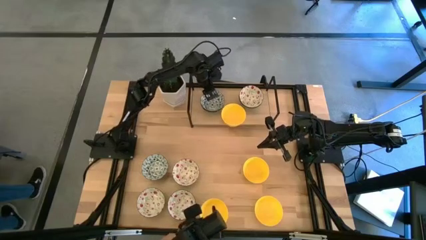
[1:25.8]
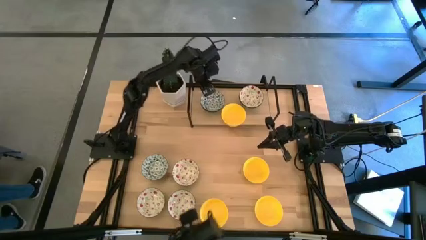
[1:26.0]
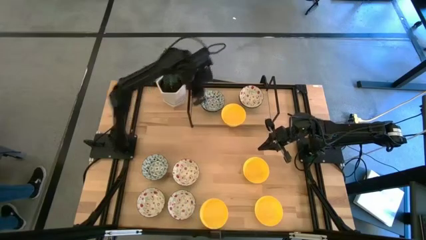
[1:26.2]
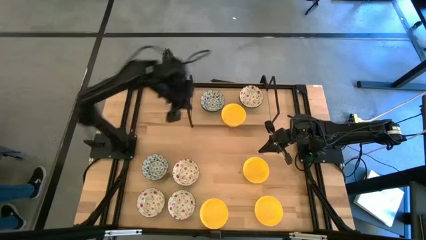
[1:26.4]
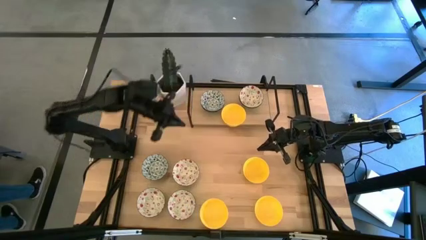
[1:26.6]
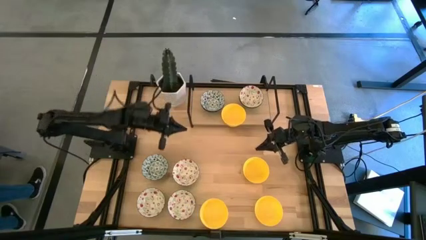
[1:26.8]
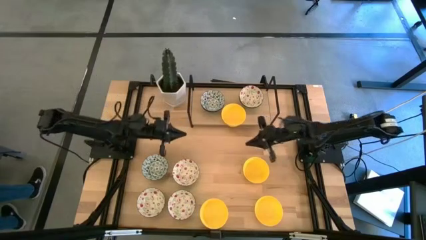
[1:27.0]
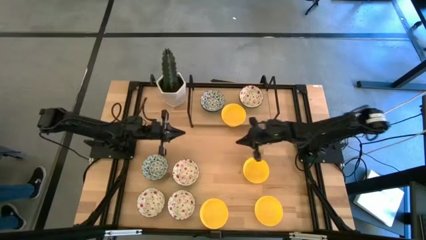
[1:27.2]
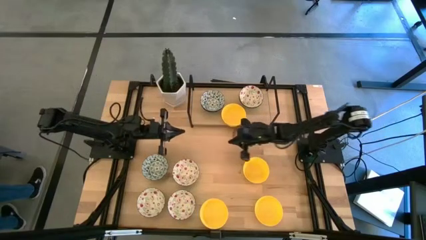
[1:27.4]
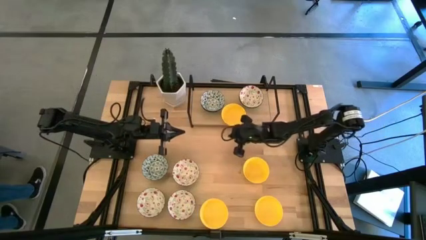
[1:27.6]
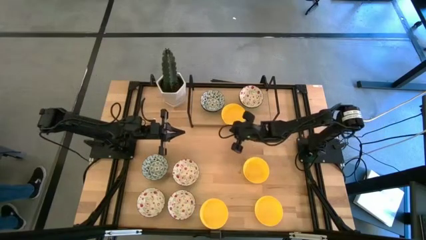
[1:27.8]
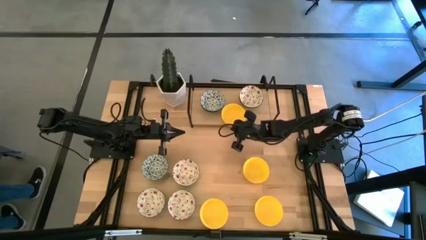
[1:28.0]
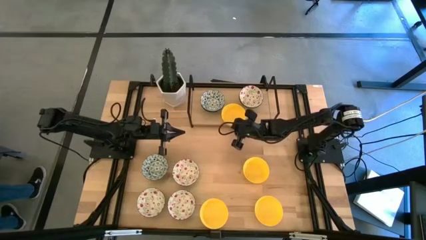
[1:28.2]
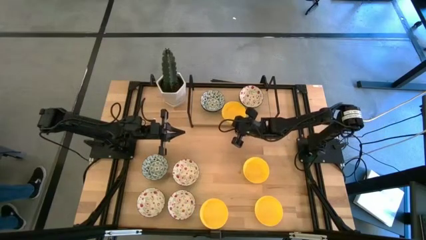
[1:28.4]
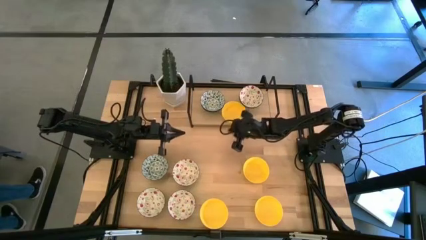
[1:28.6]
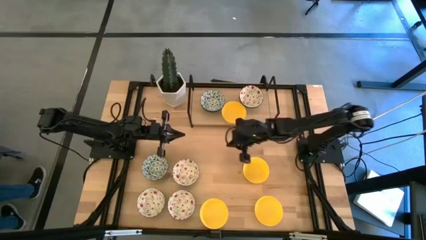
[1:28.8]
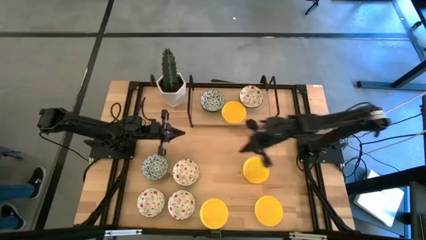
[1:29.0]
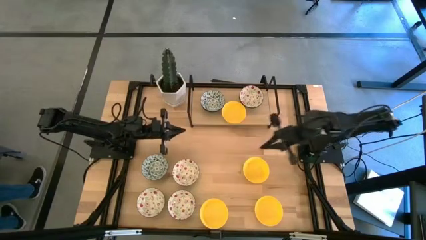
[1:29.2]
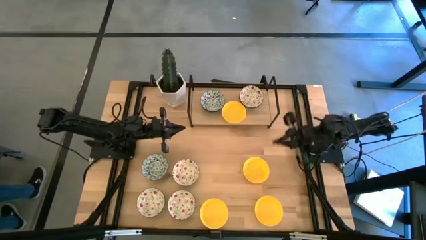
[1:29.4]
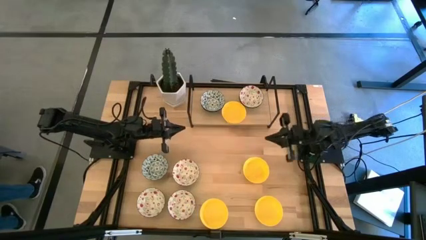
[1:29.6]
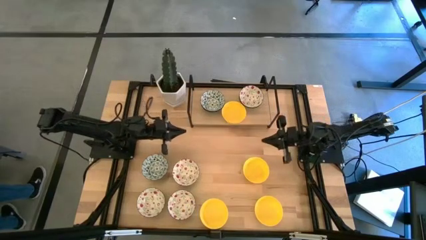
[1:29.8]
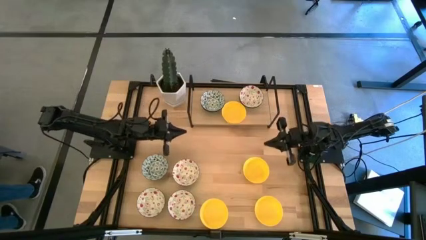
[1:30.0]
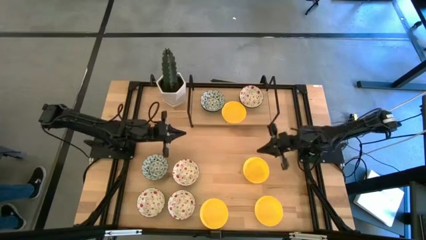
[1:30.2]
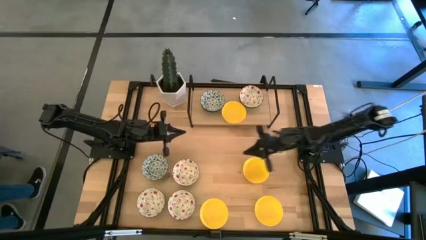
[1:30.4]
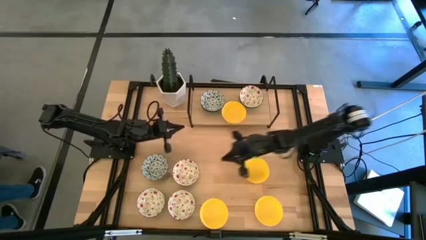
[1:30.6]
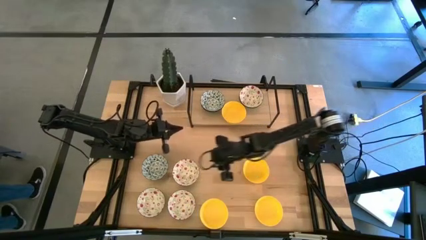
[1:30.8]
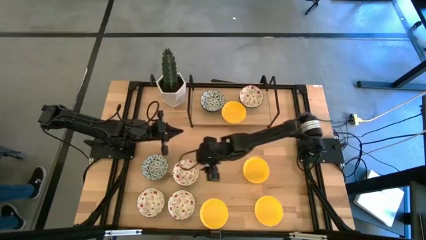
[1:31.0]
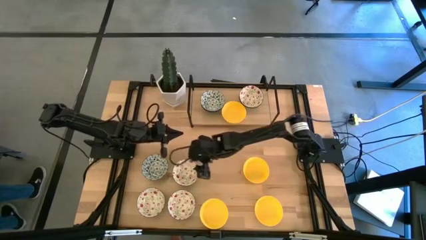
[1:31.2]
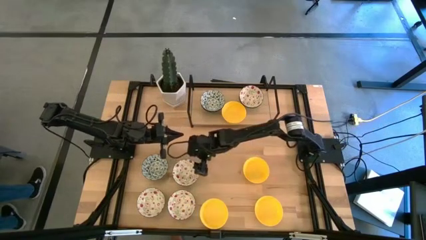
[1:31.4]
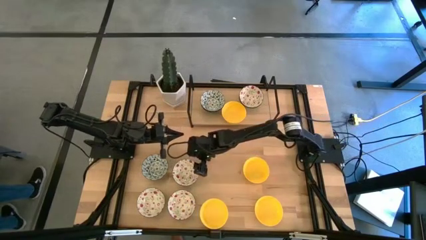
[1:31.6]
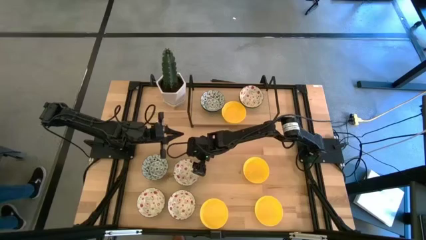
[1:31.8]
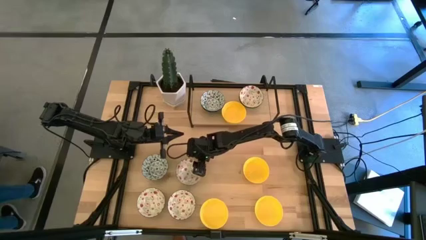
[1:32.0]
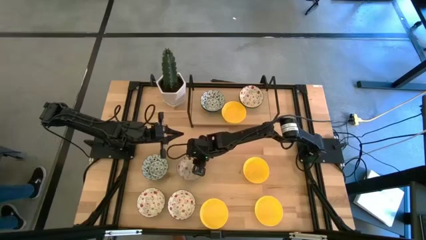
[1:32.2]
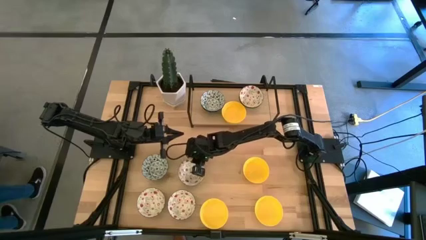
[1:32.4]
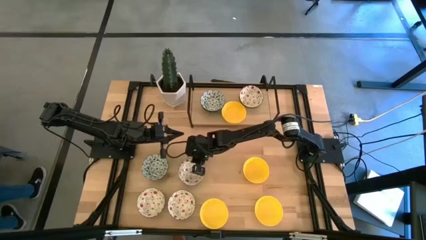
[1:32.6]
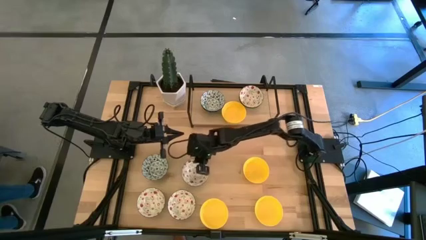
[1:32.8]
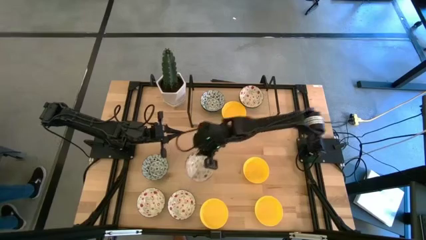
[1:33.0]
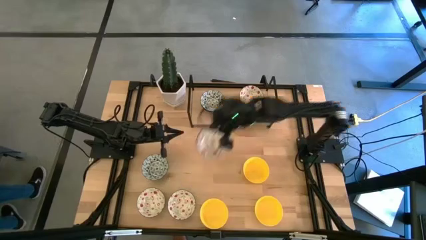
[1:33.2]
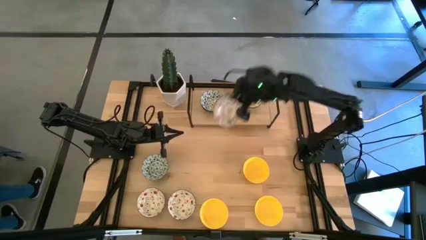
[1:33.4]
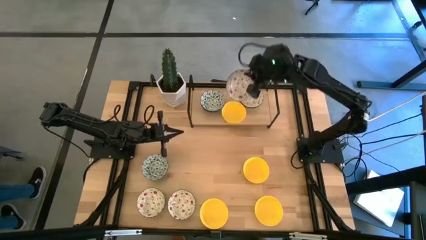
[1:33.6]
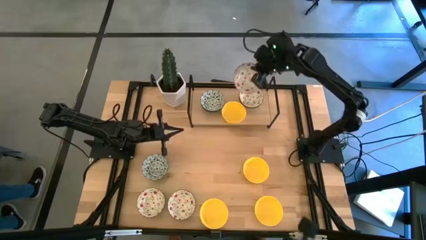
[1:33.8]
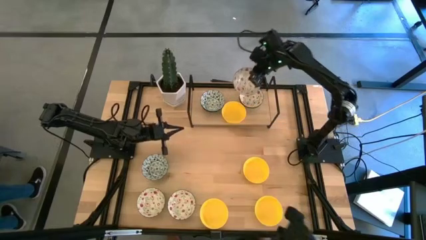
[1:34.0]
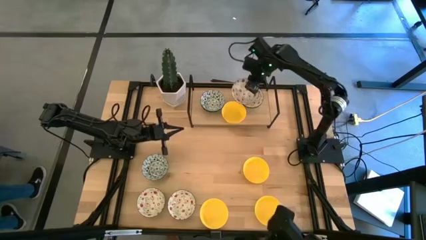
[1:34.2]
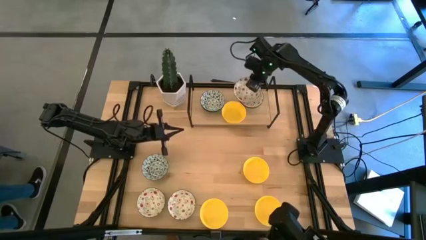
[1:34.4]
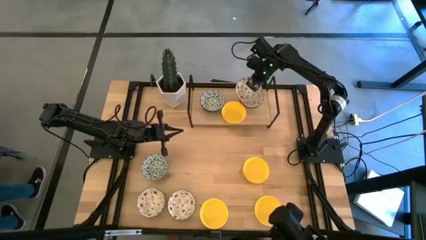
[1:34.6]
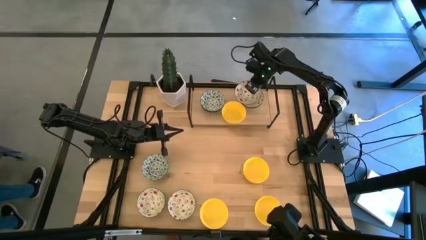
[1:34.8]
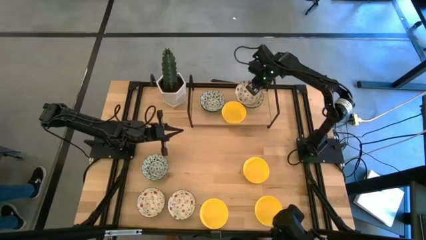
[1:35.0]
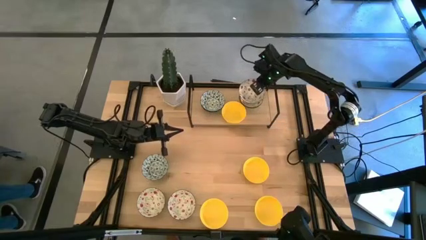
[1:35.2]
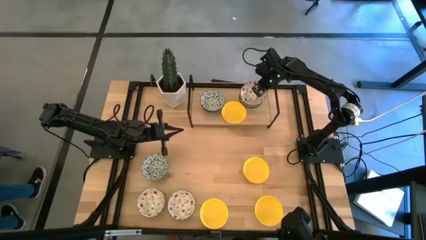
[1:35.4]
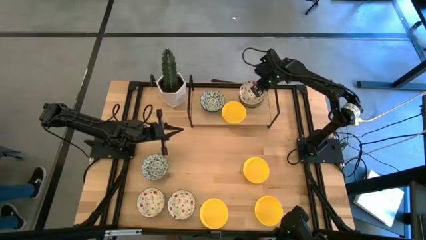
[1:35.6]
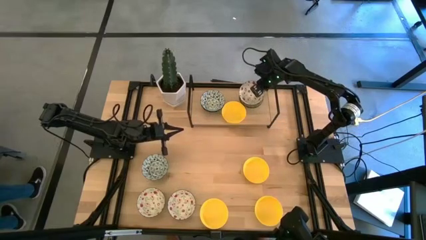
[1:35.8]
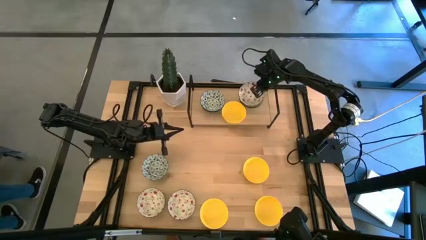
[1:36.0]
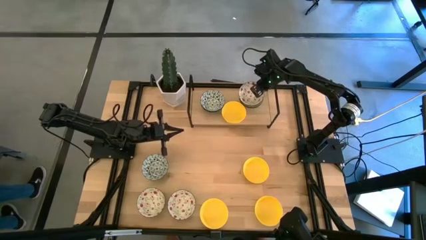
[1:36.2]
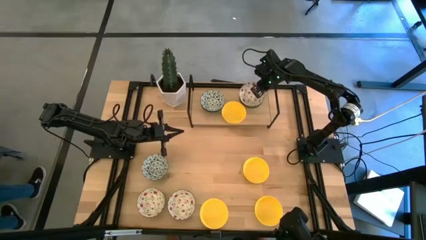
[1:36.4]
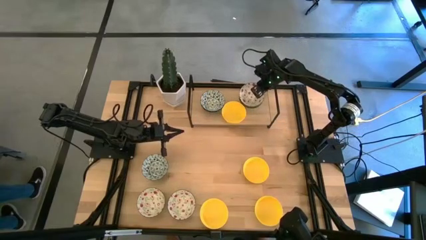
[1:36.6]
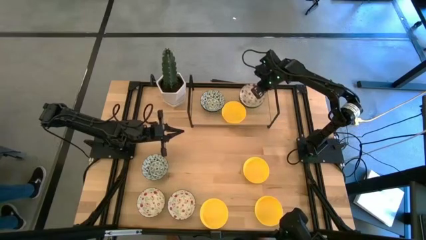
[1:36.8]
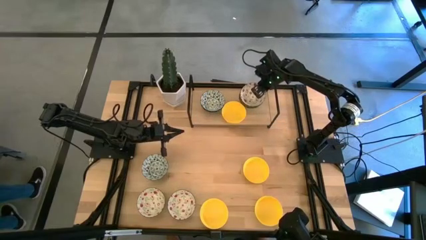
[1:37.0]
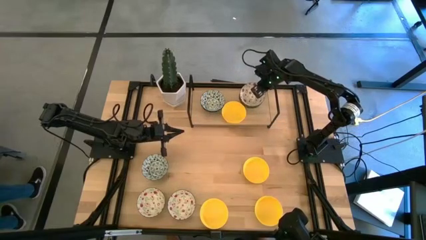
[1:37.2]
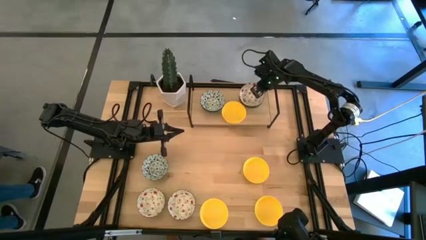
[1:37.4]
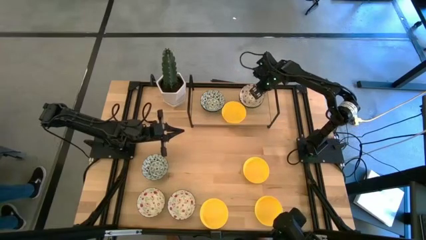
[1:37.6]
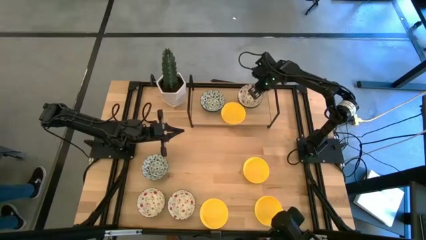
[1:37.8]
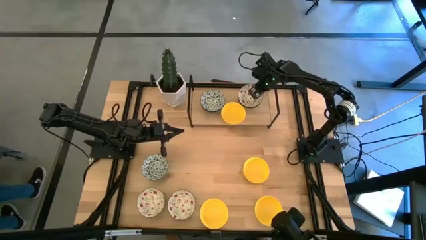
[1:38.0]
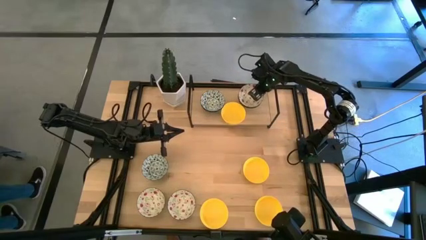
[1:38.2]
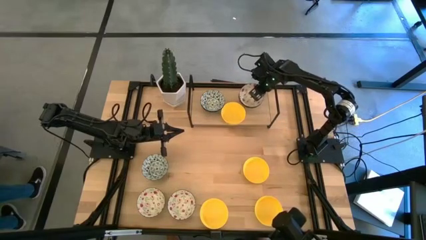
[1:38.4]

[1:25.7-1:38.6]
Task: Pick & Place Mini bowls
Stack the green printed bowl on top of the green printed bowl on the shelf

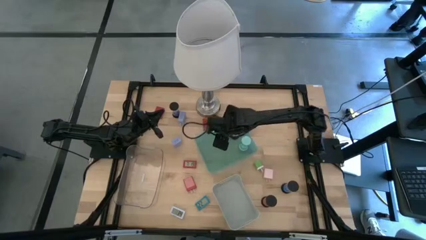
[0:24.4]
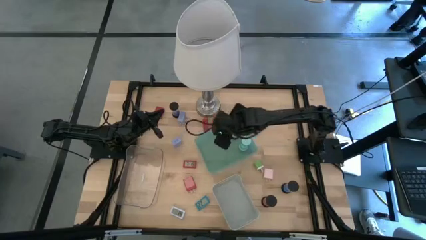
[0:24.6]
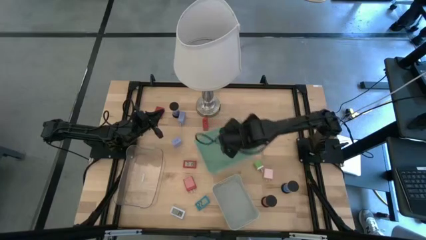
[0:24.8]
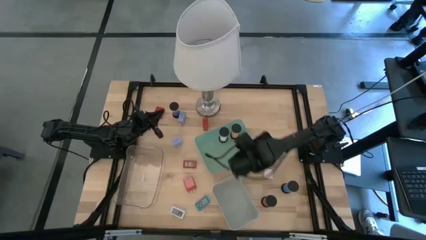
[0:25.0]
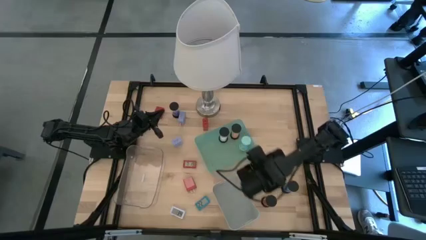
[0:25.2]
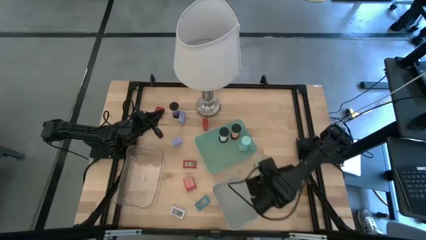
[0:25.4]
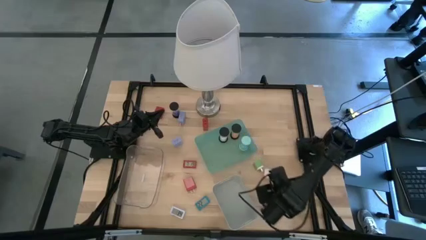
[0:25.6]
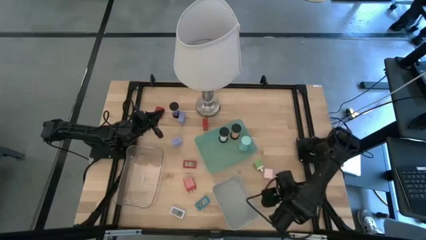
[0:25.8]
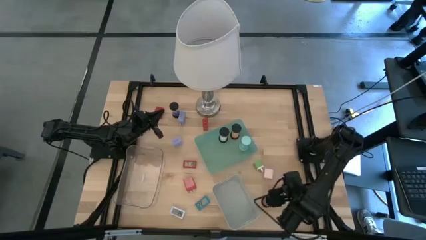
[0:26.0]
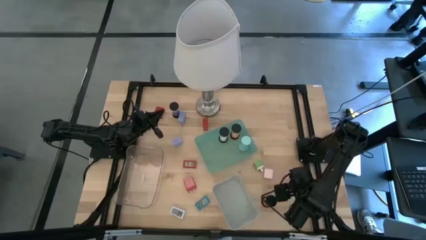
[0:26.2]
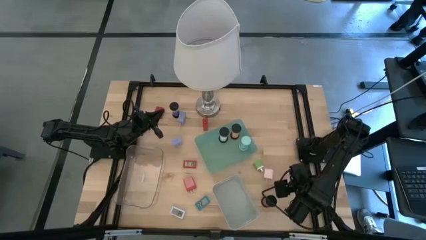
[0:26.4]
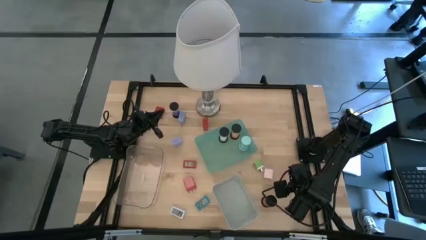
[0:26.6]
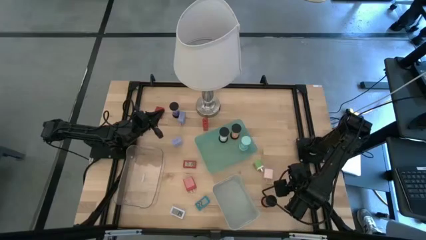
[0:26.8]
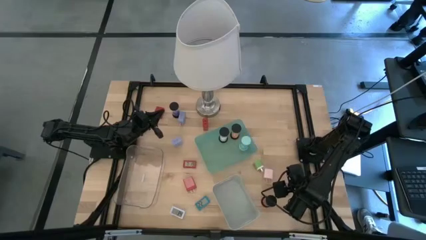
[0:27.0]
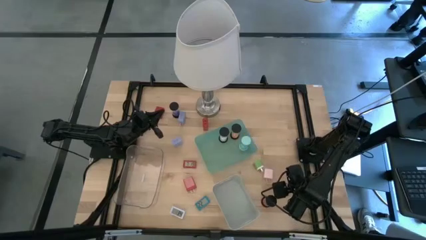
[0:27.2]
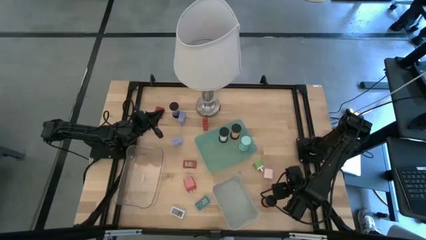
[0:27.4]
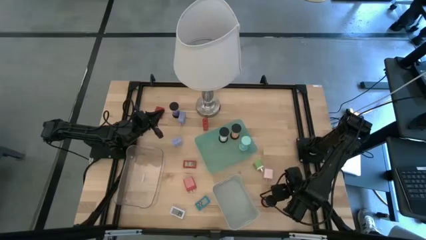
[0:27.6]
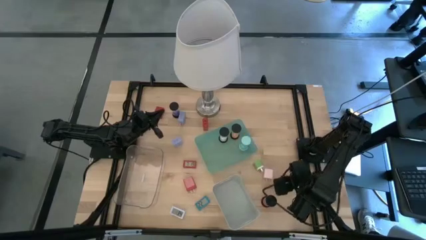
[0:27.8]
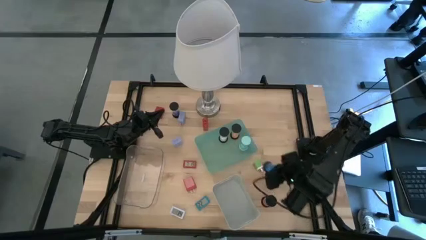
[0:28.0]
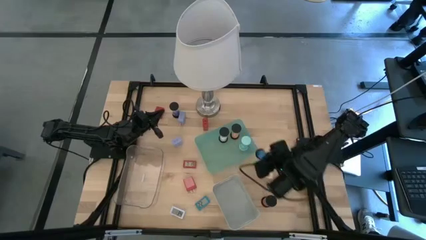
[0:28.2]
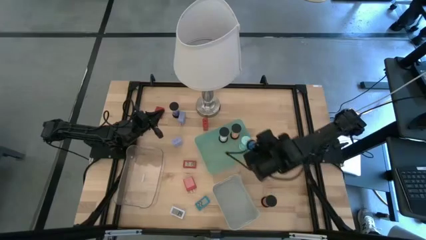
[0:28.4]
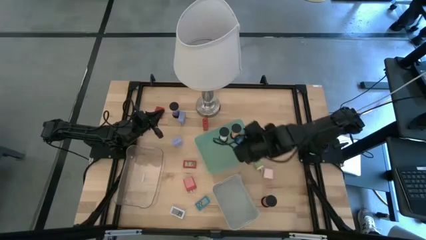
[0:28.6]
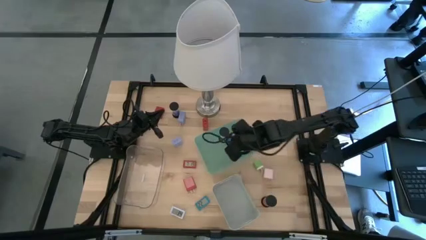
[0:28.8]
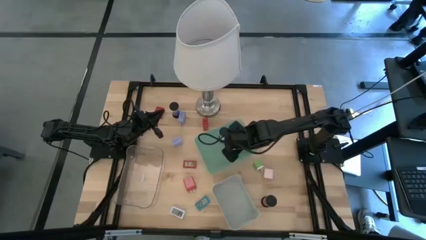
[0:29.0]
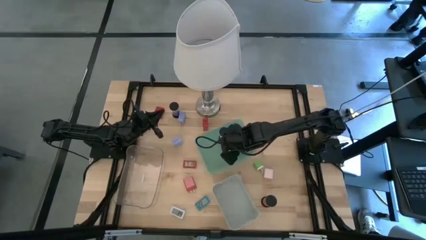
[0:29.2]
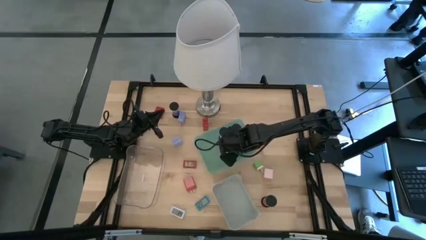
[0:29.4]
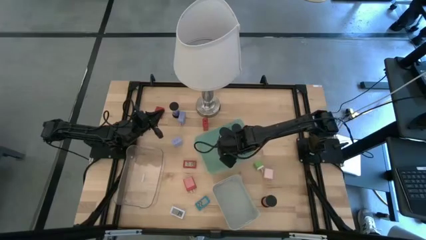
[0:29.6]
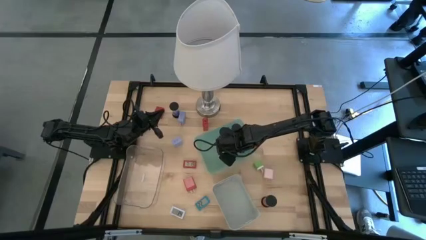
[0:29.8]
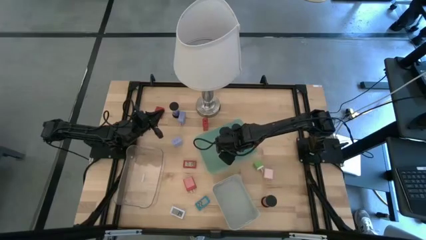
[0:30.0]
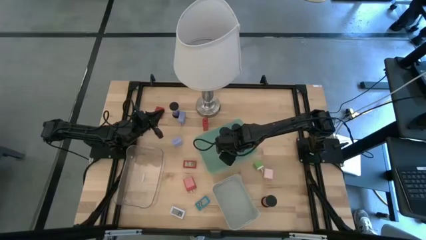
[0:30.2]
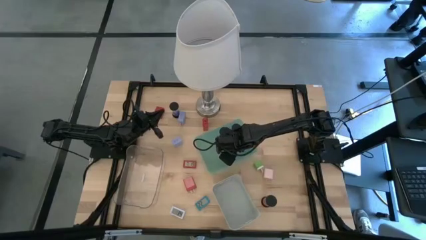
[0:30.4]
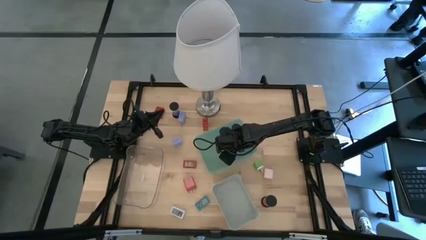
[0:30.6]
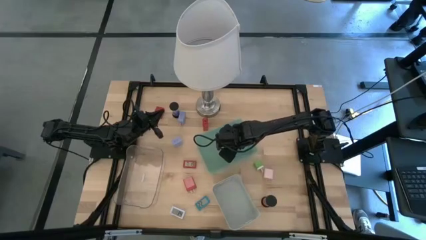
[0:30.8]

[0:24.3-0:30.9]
Task: Pick & Place Office items
Put the bottom blue hourglass into the green bin
